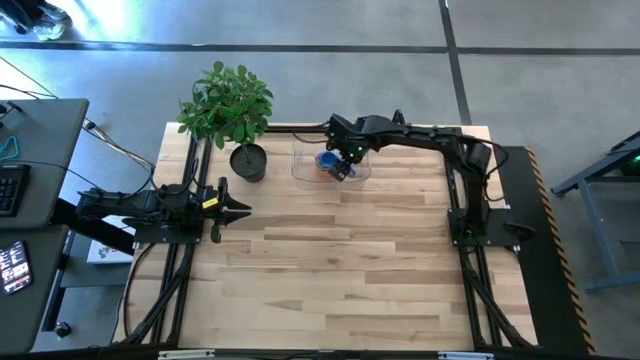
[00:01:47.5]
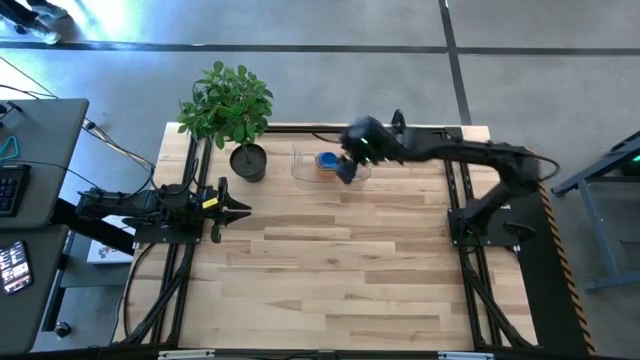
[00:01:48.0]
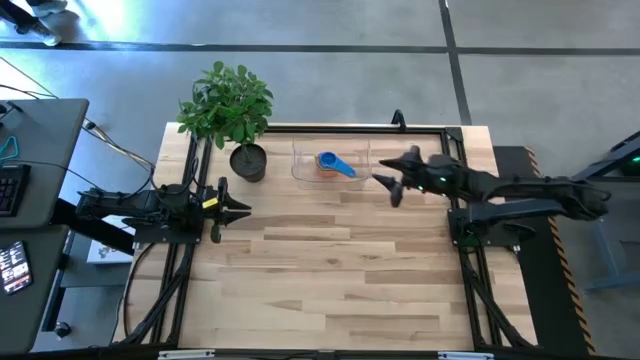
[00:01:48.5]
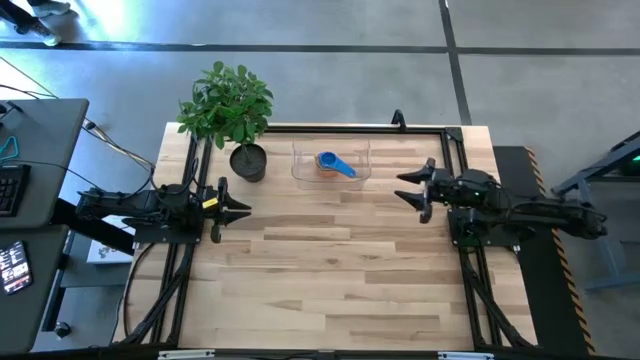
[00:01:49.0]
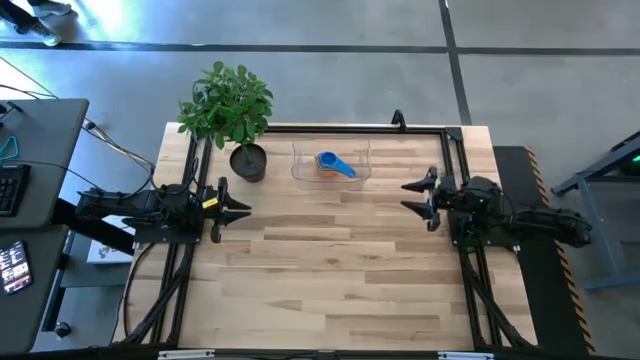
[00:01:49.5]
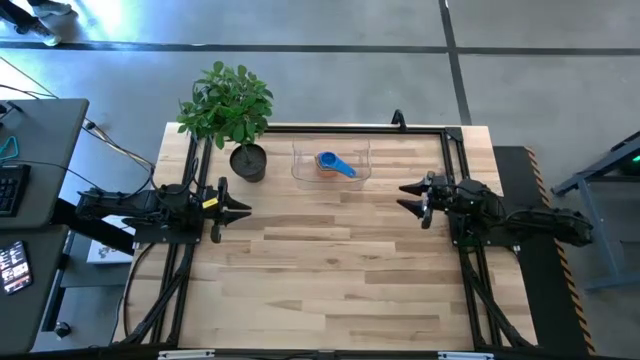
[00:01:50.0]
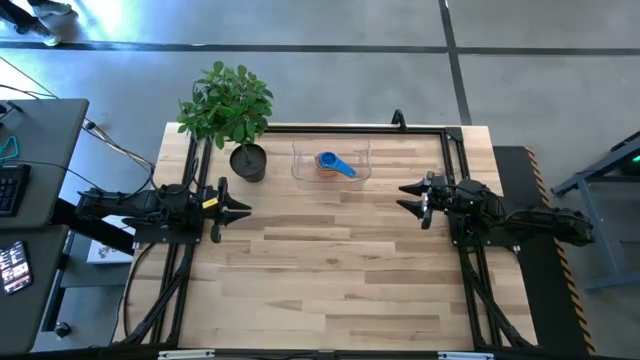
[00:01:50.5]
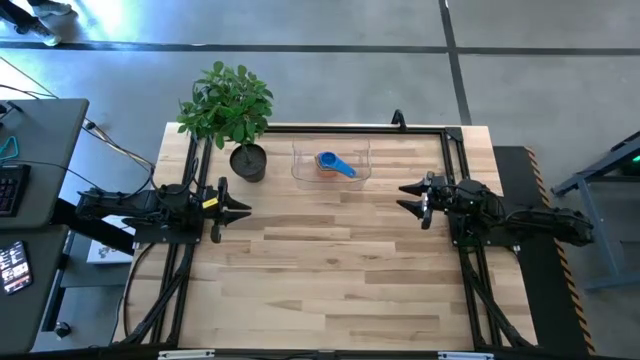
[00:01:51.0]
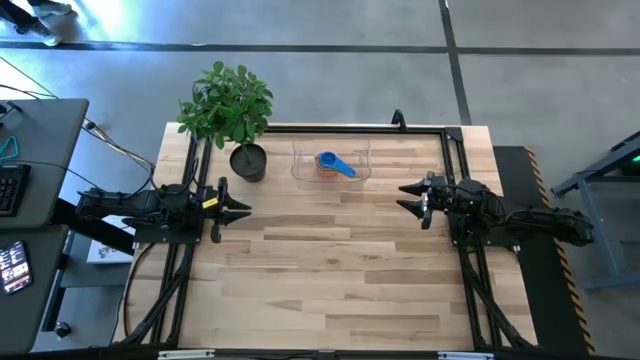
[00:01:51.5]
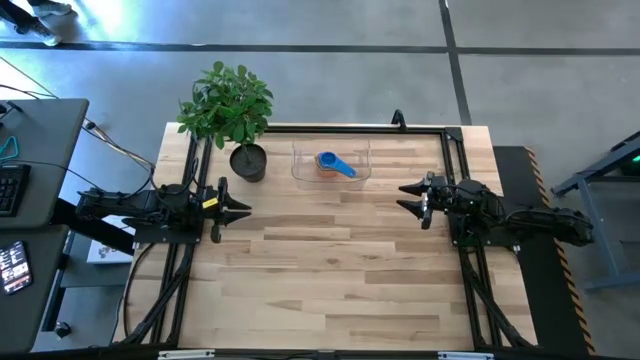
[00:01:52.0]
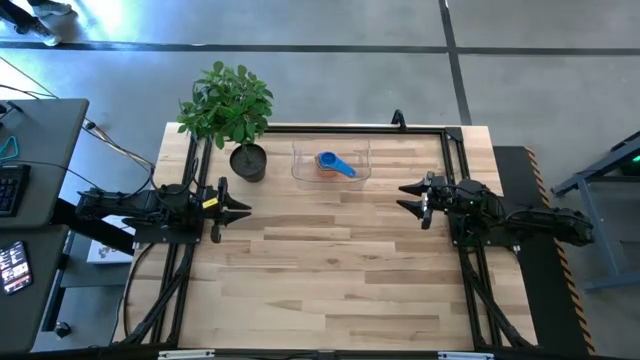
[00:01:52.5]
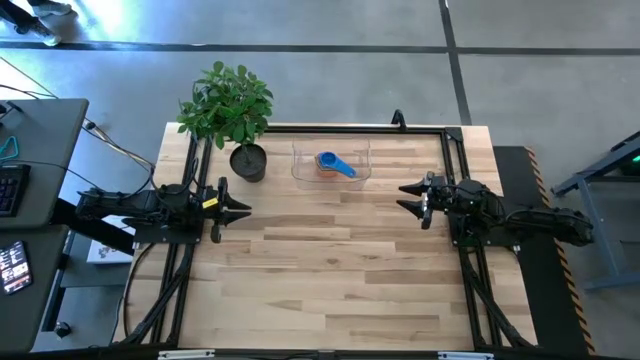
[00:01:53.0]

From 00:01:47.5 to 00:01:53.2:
Task: Nest measuring cups in basket
Return to Home Position

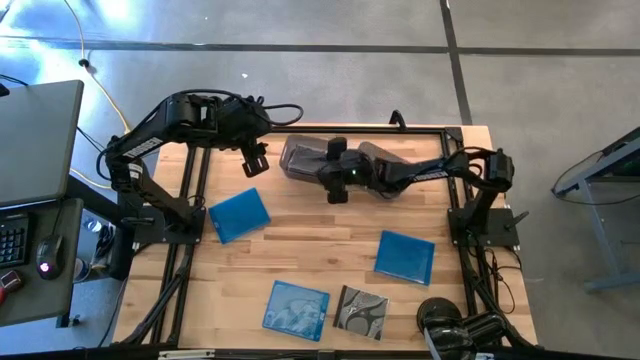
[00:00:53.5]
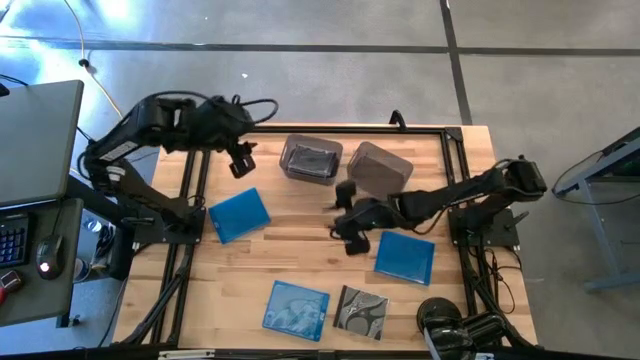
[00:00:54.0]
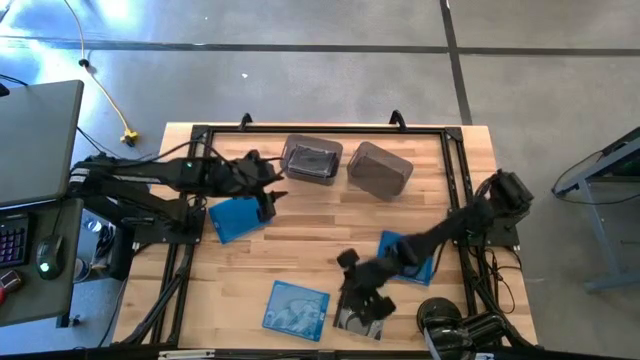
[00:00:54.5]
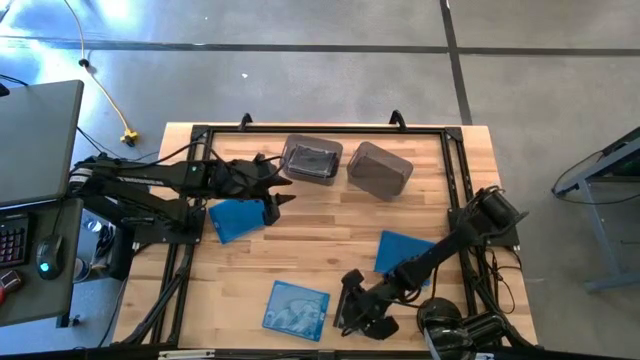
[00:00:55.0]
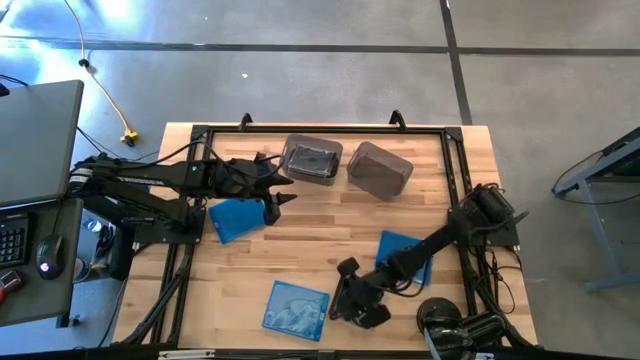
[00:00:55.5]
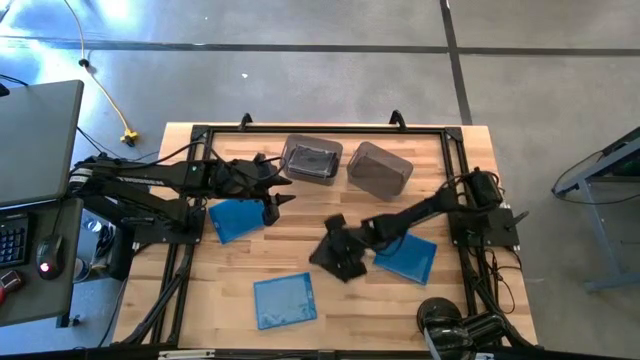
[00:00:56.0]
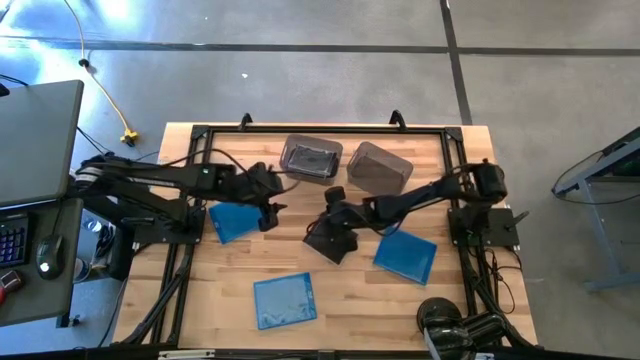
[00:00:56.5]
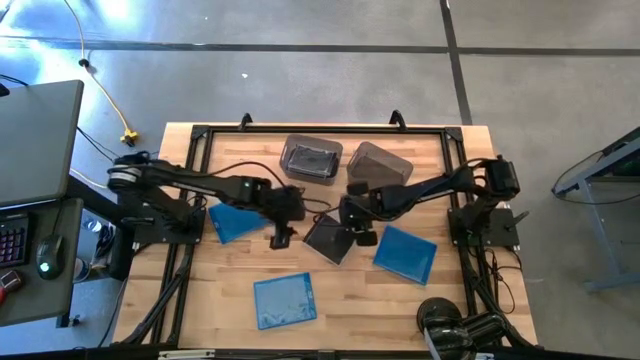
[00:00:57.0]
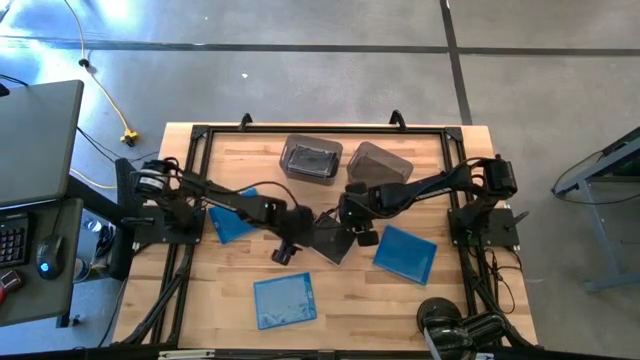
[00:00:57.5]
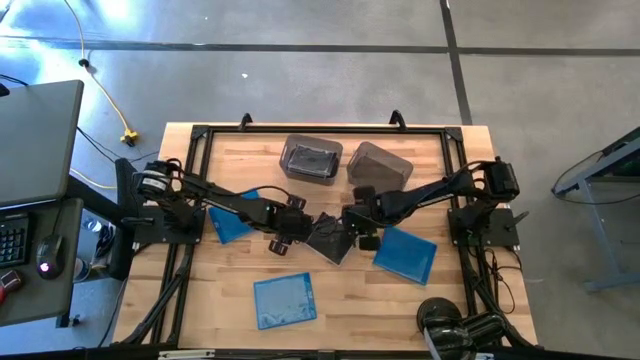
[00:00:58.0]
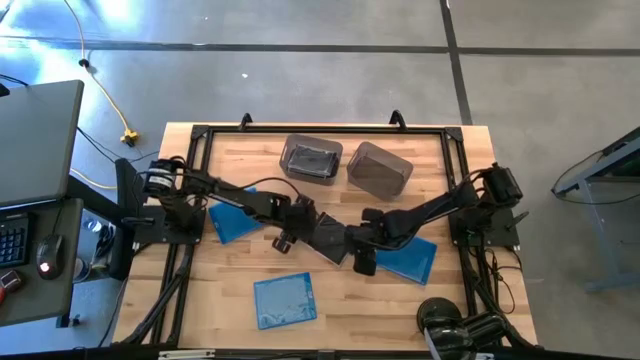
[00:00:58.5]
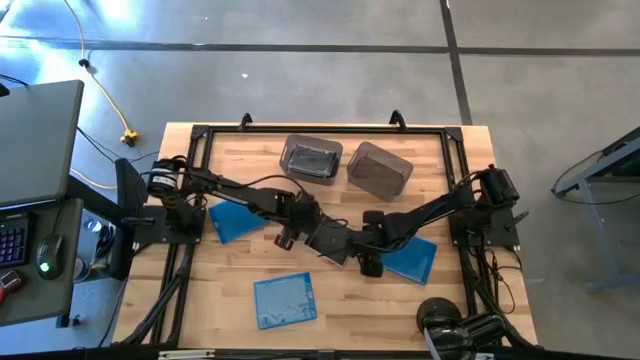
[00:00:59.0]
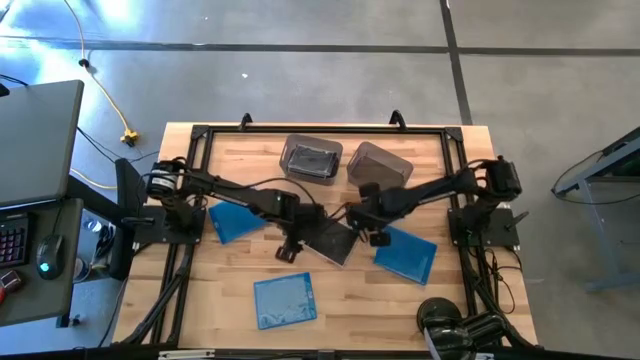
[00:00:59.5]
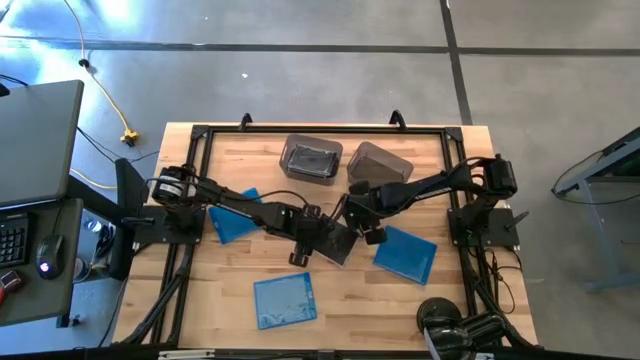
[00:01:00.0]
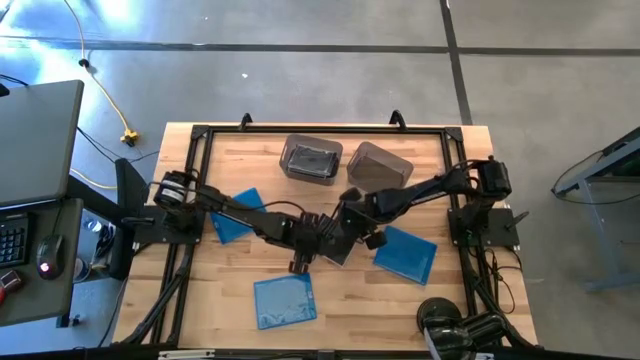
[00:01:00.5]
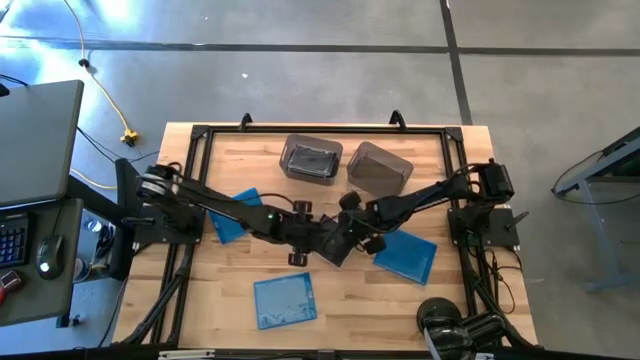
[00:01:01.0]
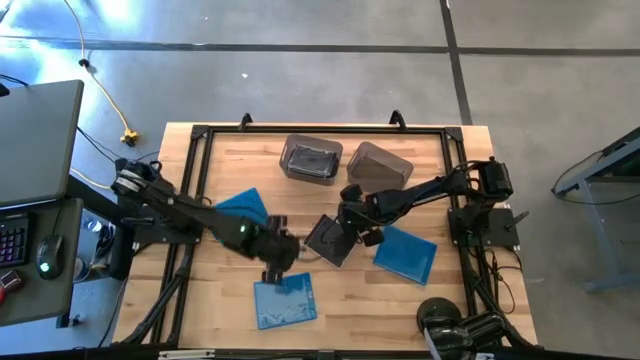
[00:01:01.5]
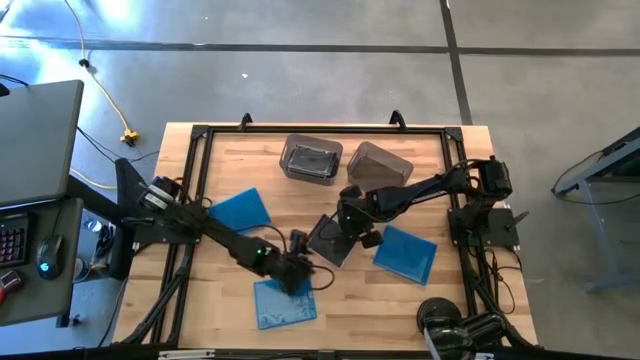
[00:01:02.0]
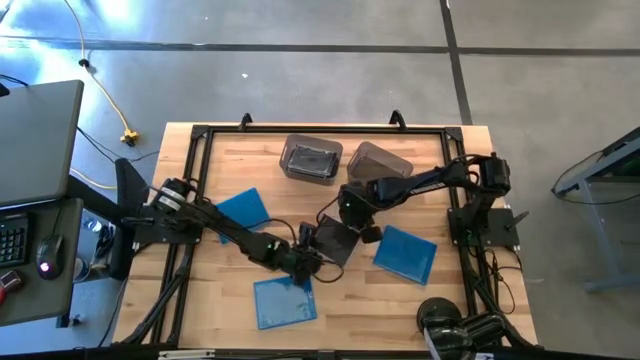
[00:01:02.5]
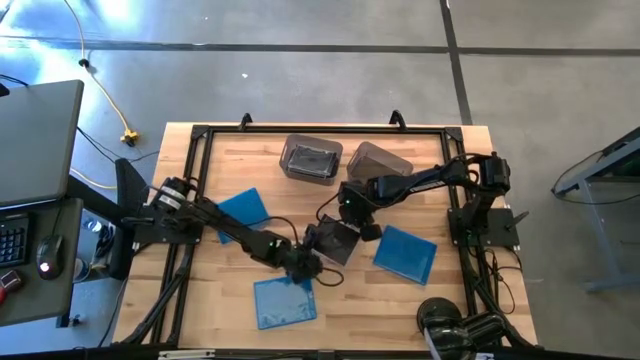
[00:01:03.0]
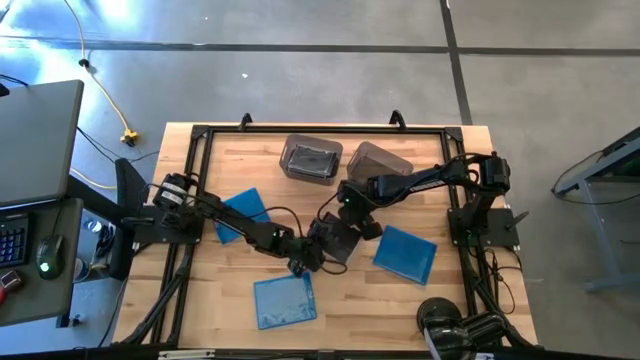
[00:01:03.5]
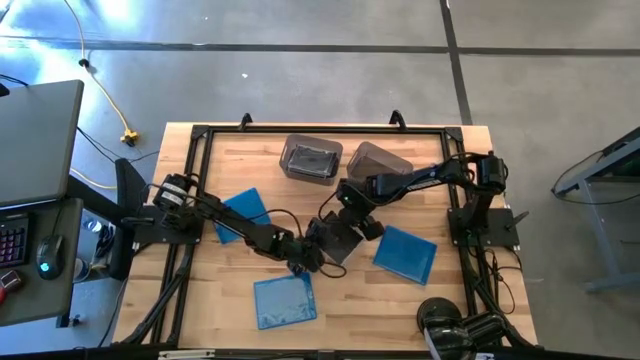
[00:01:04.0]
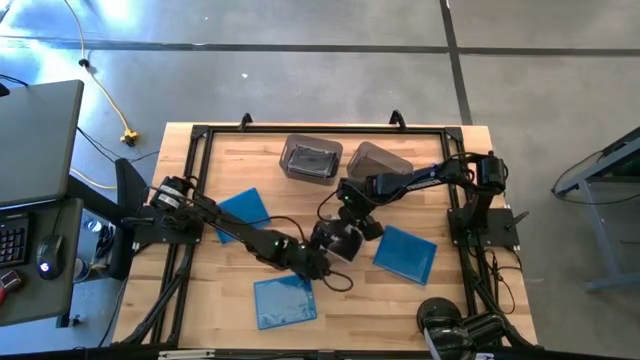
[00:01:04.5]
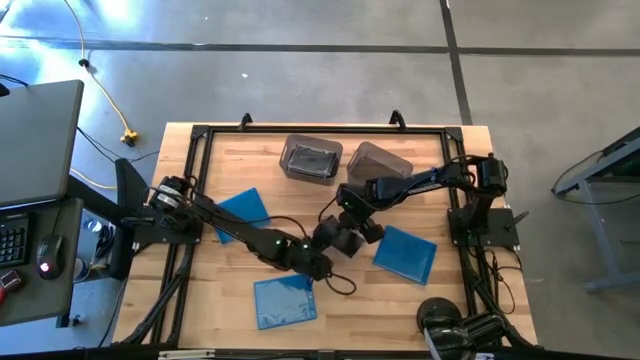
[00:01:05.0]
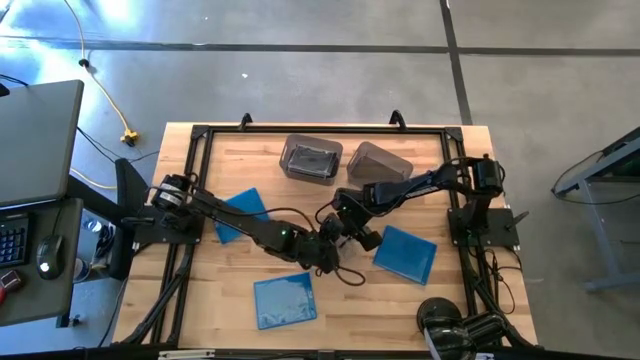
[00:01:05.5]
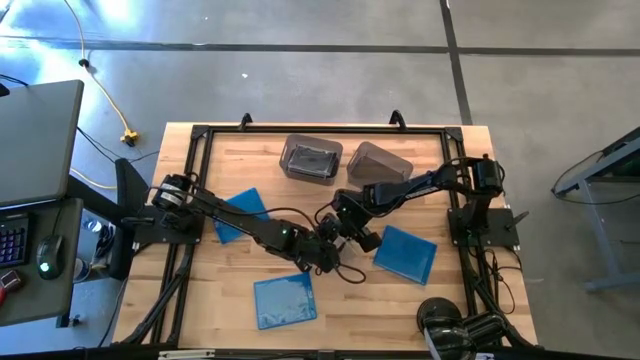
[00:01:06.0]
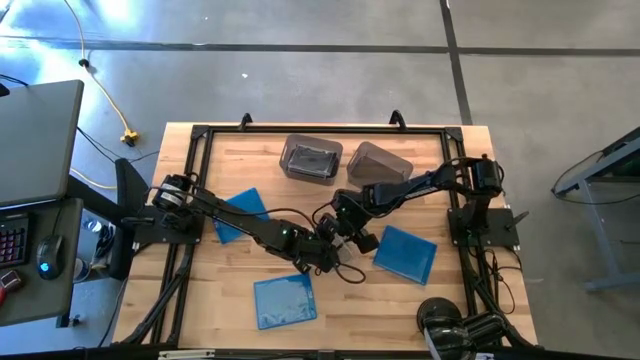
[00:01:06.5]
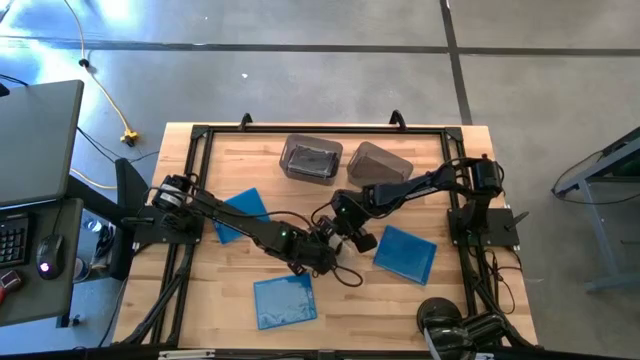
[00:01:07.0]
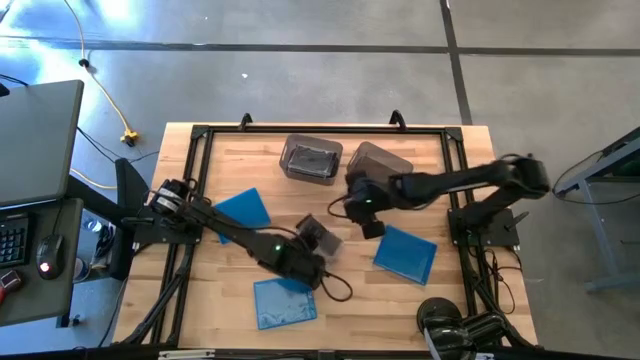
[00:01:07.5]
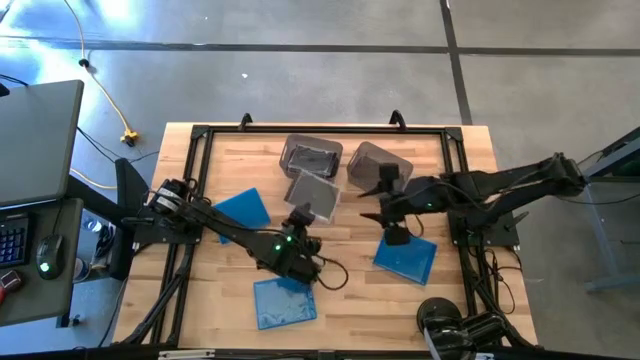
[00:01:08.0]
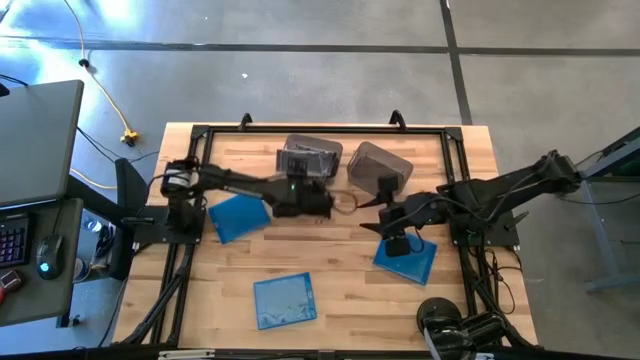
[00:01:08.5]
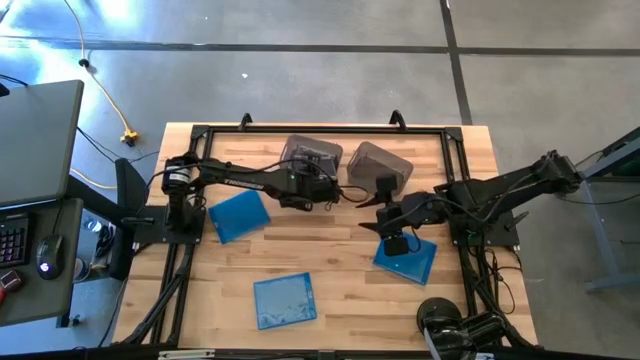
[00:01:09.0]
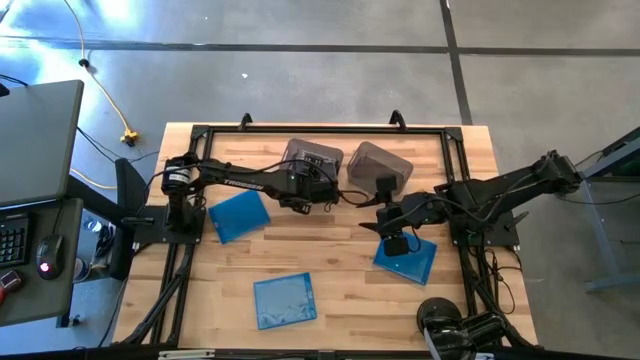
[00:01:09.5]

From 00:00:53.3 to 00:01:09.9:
Task: Pick & place jewel cases by type
Put the black CD case into the left black bin
